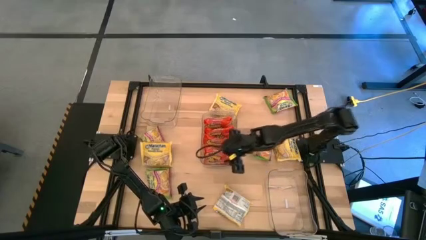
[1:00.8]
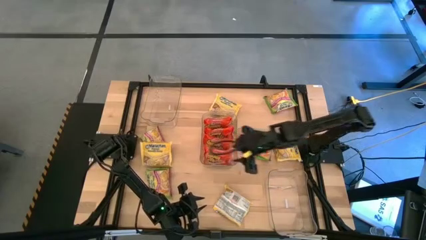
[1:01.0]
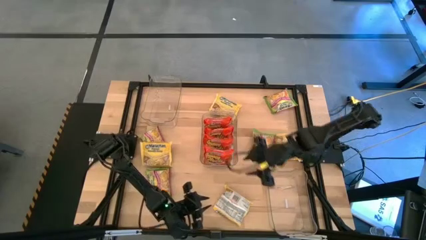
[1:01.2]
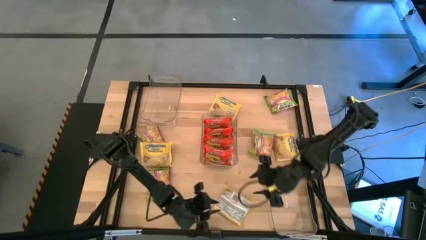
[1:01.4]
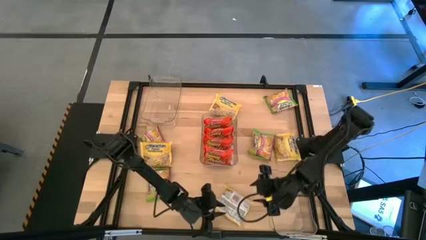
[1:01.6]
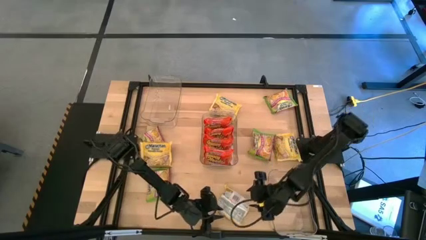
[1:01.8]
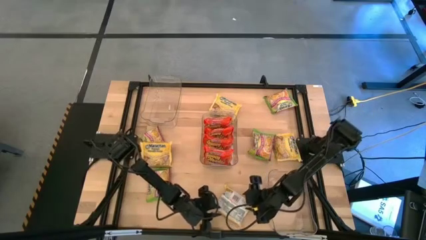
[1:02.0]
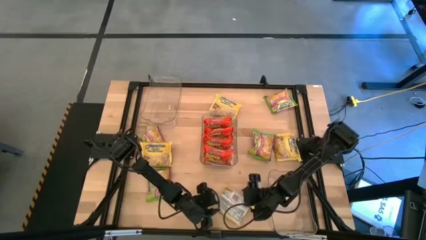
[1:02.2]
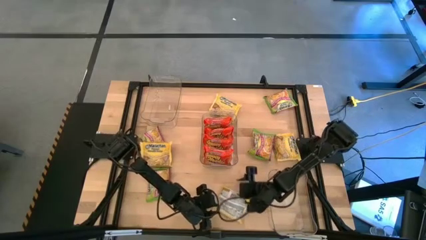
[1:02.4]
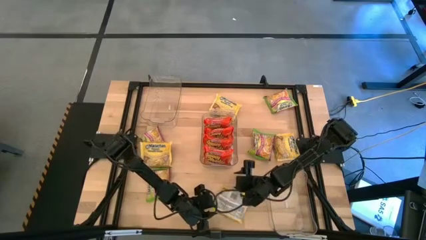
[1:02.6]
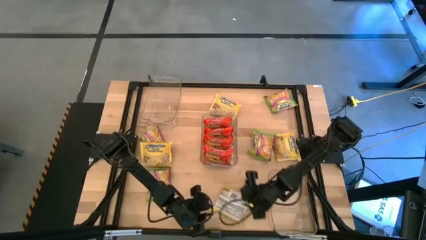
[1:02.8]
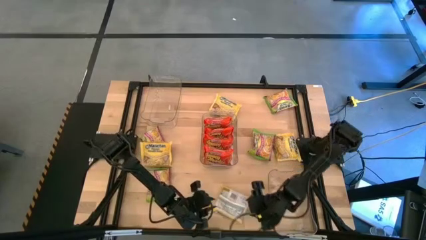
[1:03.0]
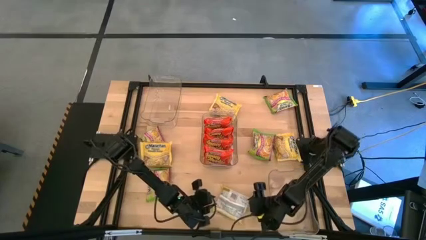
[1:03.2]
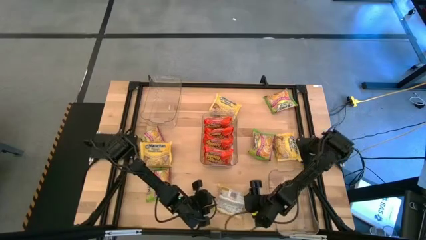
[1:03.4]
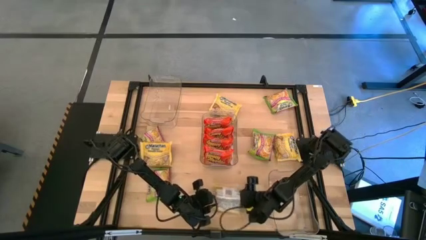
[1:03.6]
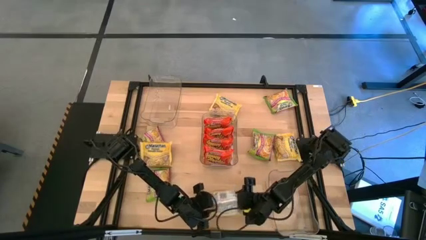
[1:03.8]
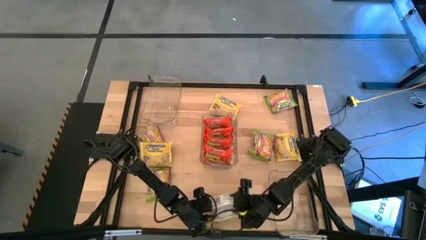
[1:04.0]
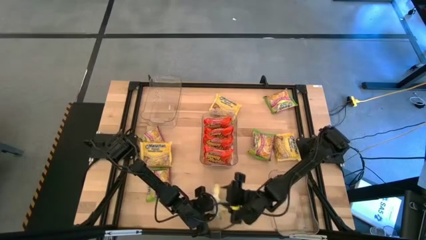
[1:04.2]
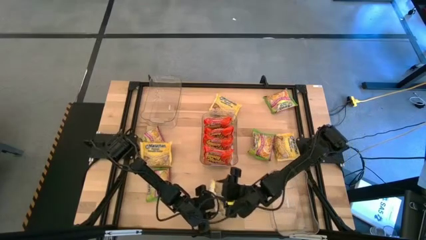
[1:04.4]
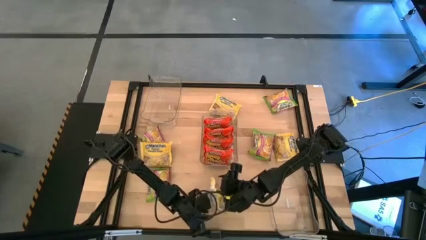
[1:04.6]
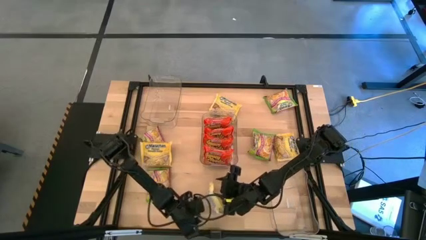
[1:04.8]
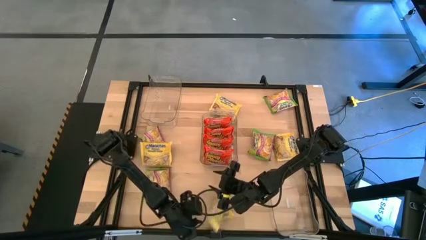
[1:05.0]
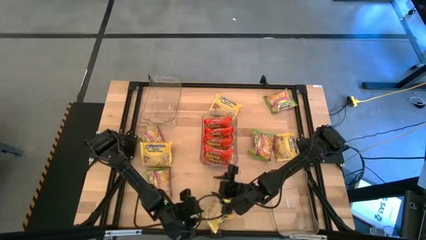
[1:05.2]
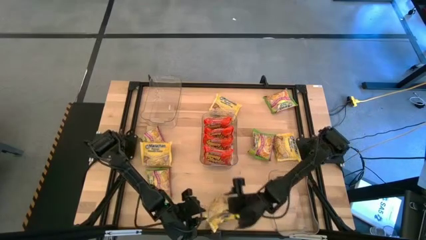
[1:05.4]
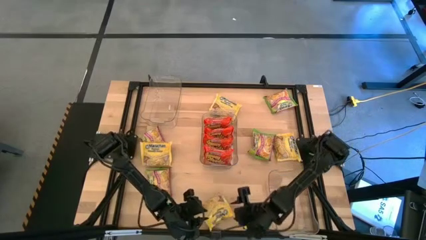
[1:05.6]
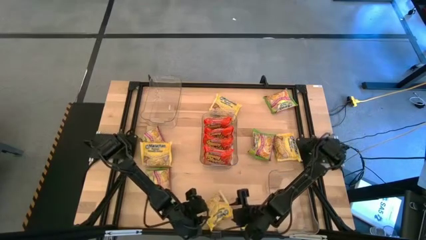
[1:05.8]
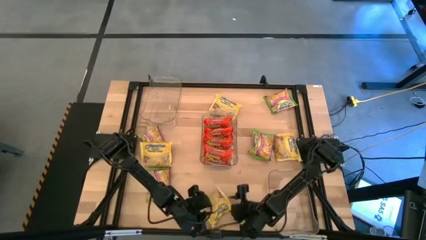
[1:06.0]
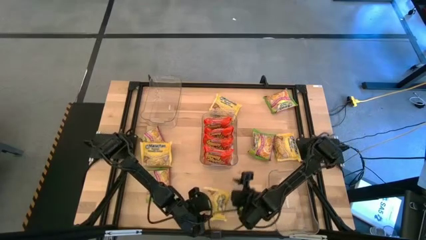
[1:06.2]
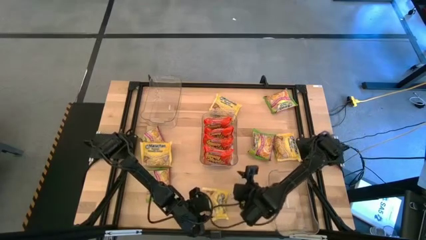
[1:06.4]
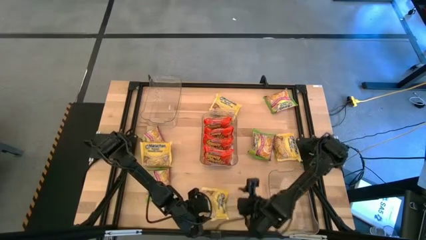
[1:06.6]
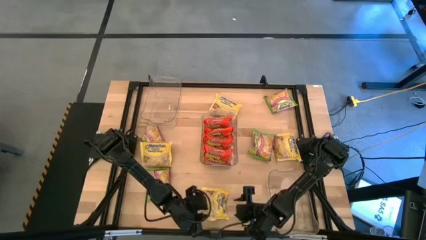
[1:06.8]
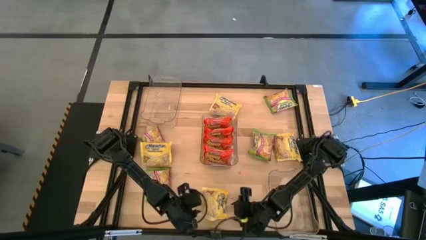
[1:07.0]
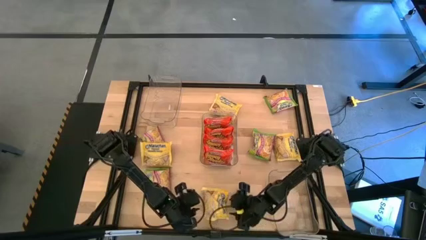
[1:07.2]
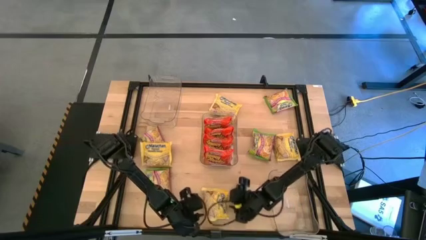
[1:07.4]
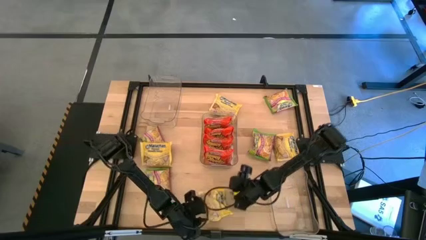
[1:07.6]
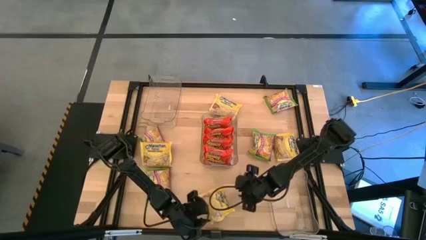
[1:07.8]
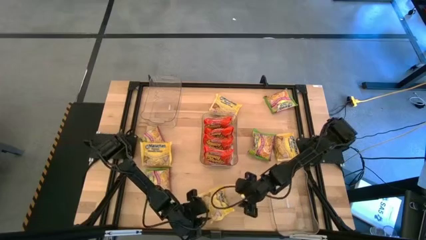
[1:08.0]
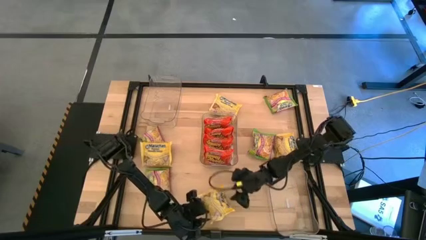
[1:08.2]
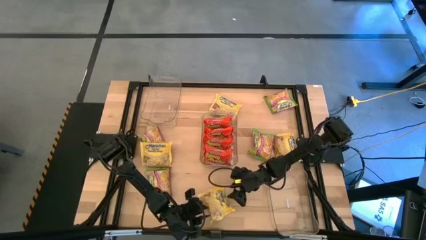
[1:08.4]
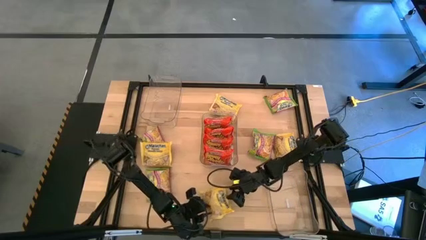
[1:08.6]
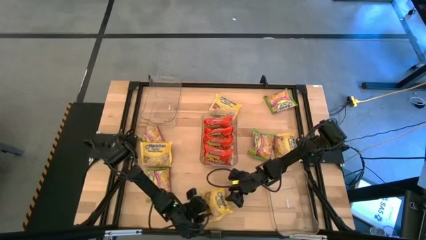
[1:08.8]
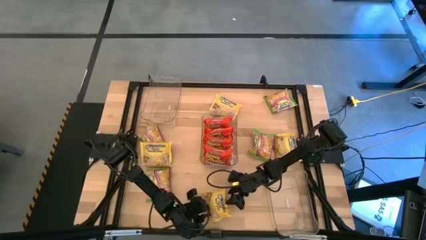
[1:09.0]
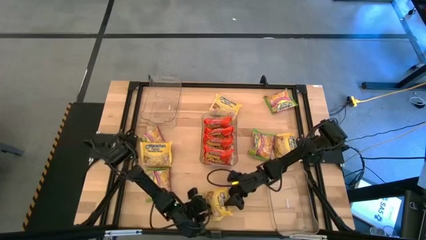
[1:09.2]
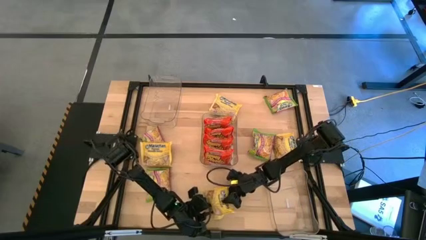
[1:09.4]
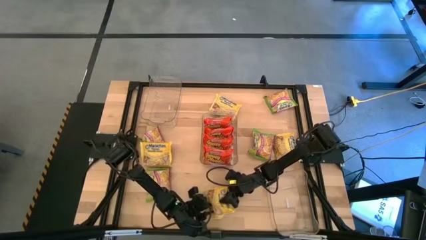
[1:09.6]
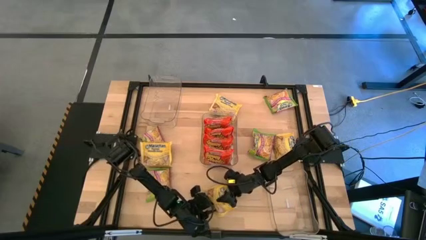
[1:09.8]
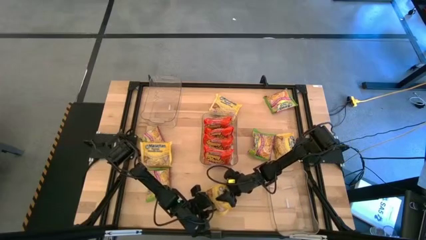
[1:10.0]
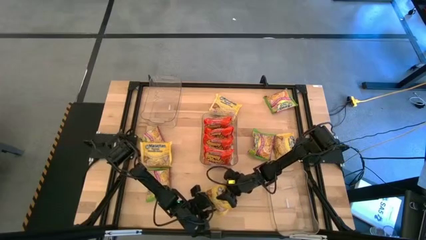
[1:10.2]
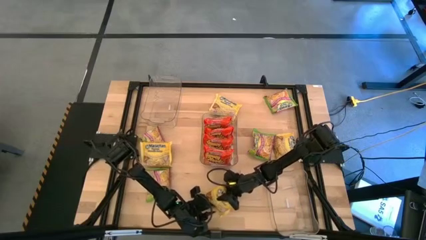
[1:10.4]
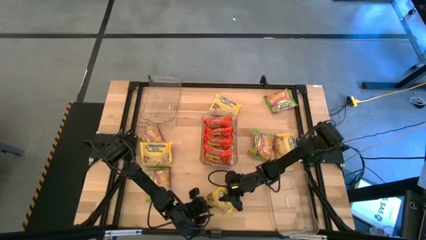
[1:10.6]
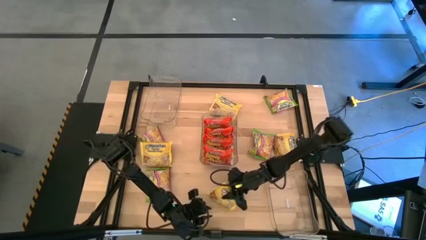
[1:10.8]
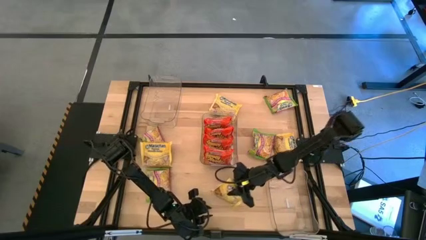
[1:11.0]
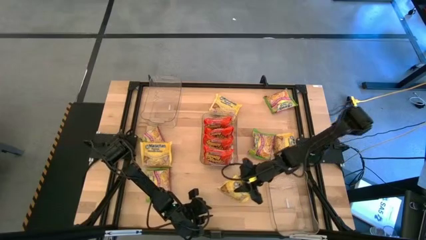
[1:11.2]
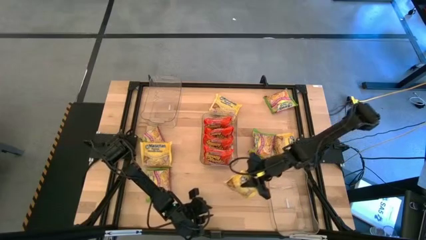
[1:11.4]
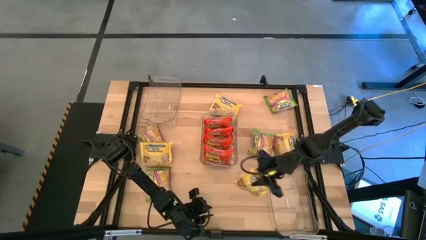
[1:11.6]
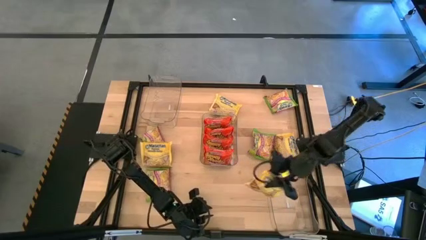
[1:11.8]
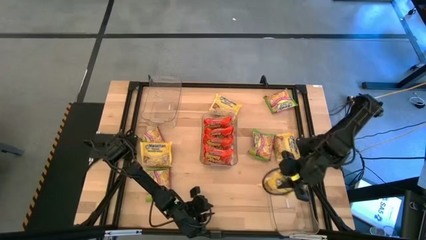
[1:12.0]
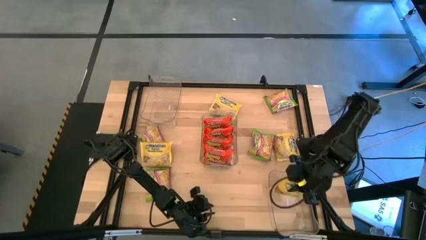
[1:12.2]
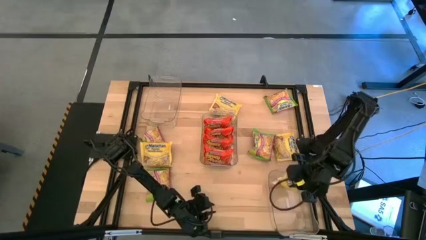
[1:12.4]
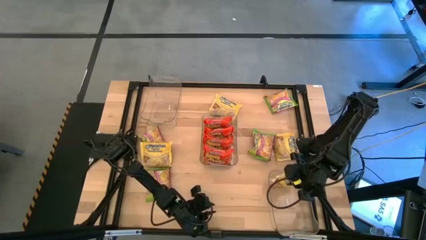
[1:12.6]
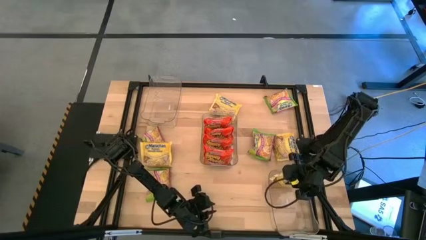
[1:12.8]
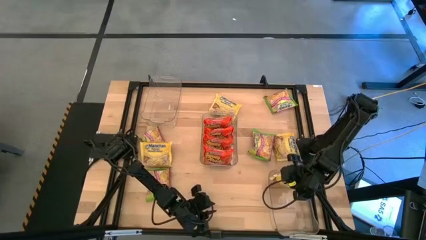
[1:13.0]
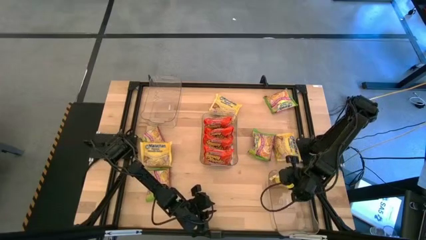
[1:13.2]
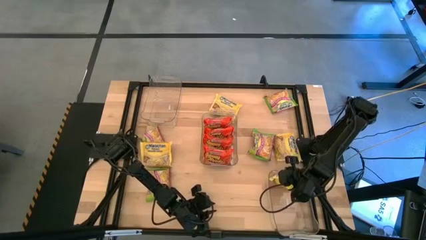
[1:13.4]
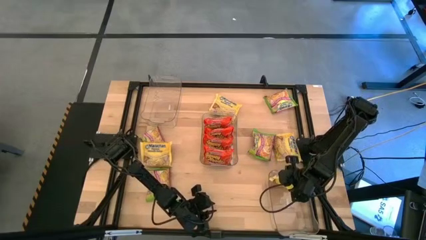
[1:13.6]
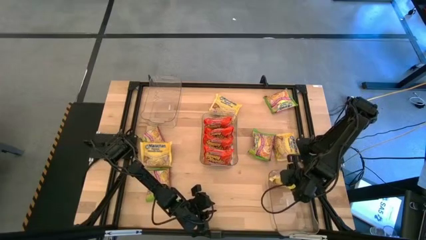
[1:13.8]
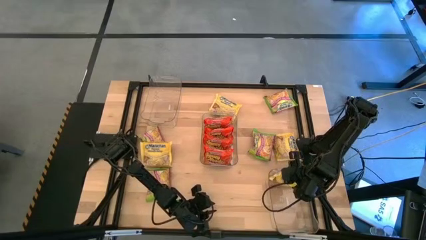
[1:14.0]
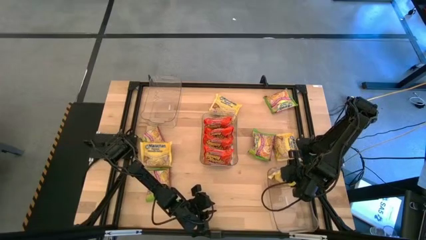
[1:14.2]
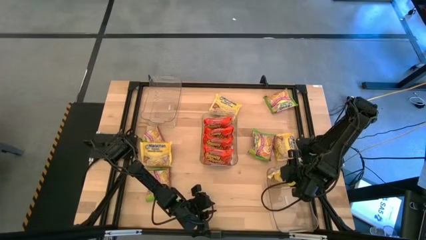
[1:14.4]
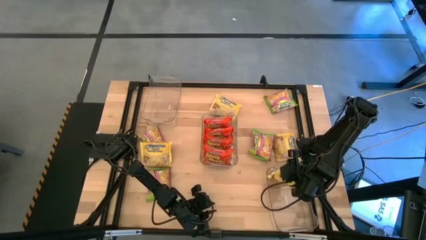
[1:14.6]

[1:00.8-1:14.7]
Task: Sort Maruchan noodles
Put the bottom yellow noodle pack into the bottom transparent bin

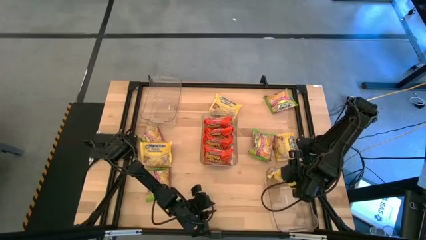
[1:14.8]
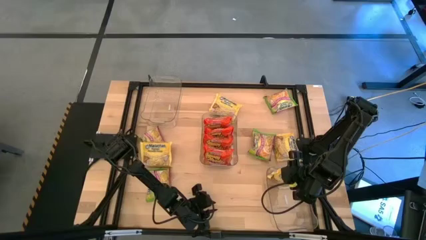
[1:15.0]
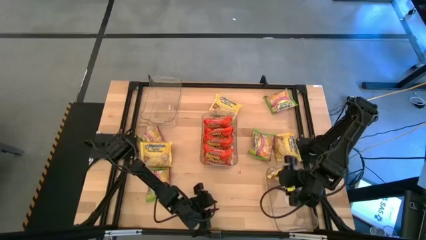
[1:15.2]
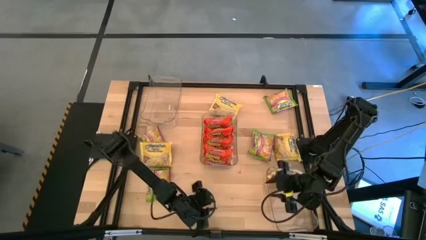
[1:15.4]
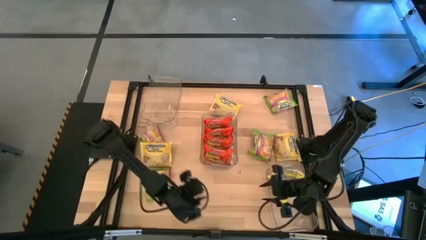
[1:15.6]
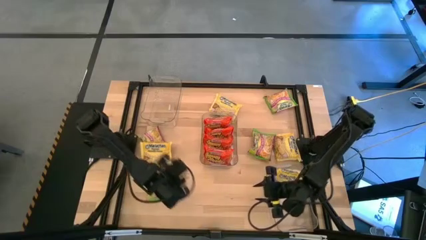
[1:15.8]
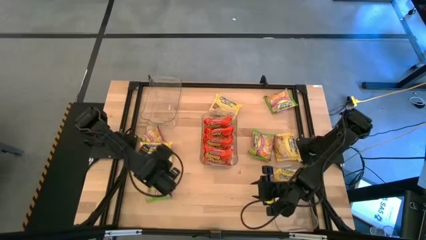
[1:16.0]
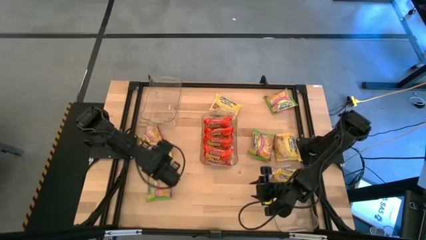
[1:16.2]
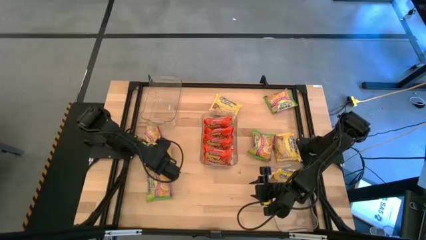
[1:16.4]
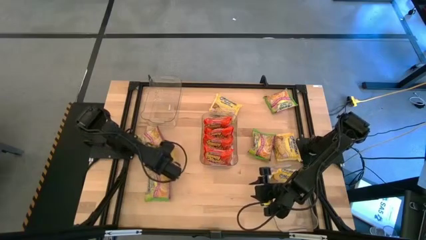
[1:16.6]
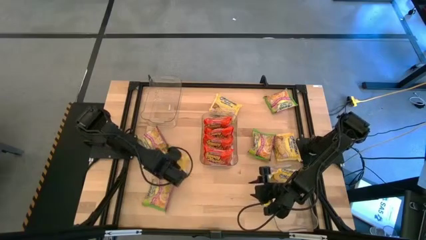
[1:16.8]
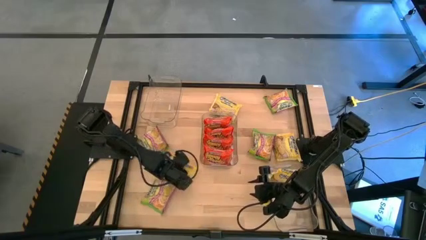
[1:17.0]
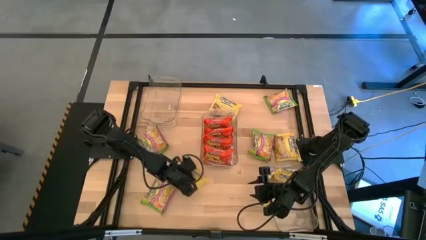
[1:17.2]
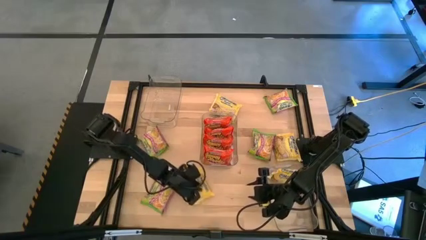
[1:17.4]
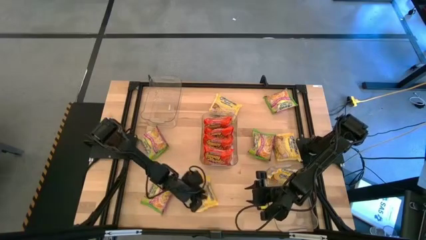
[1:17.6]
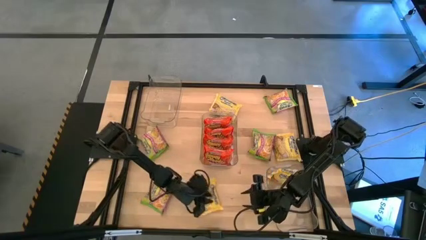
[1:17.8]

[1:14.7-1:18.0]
Move the yellow noodle pack on the table
